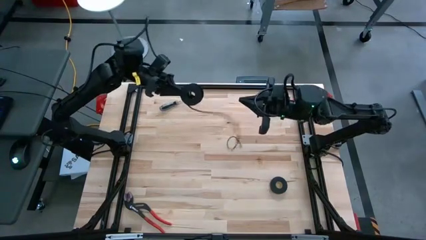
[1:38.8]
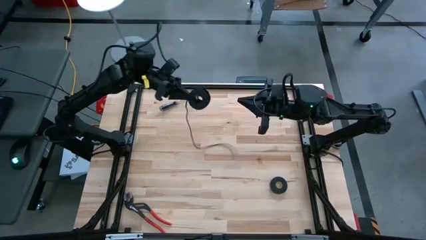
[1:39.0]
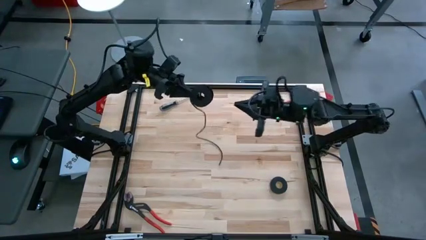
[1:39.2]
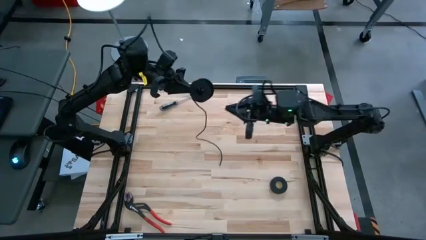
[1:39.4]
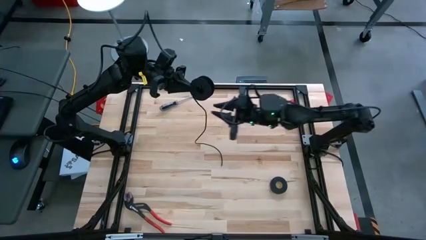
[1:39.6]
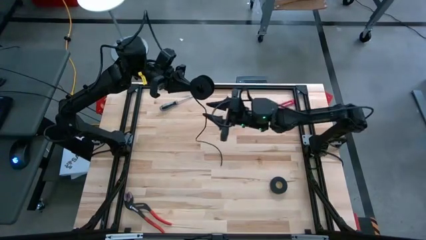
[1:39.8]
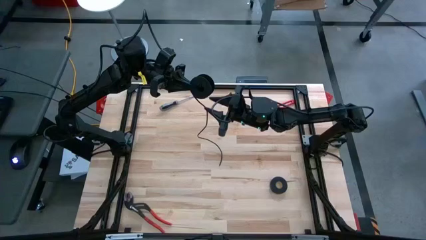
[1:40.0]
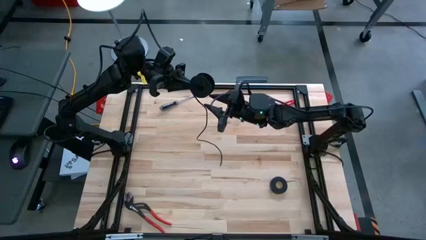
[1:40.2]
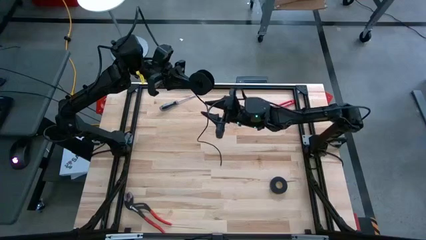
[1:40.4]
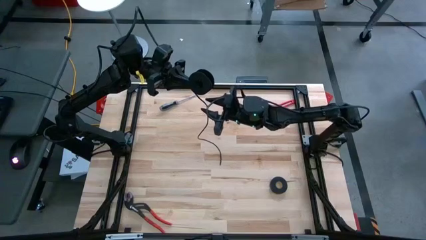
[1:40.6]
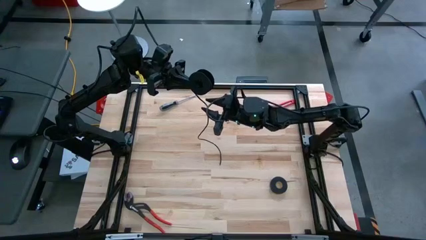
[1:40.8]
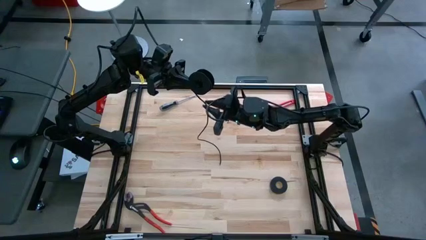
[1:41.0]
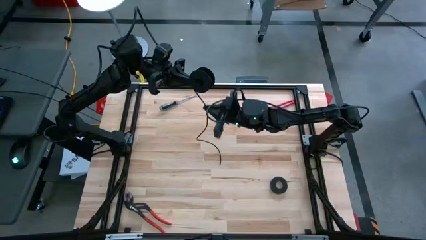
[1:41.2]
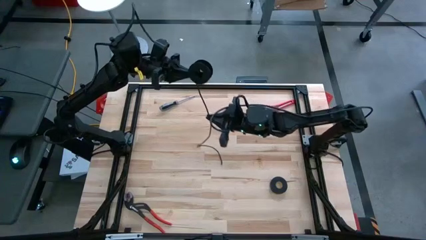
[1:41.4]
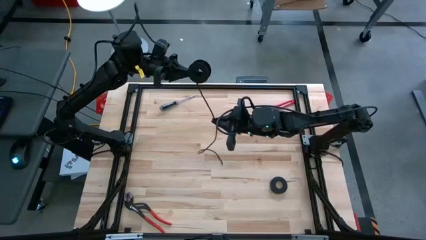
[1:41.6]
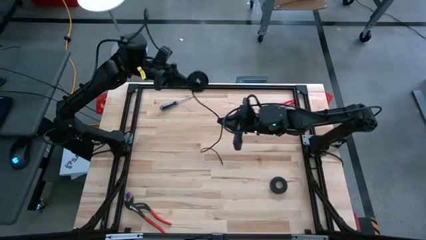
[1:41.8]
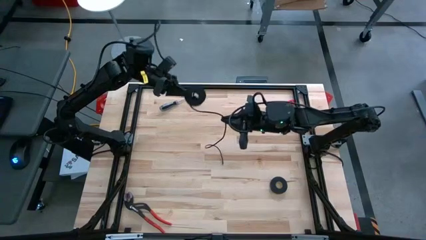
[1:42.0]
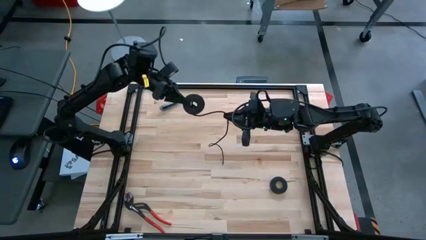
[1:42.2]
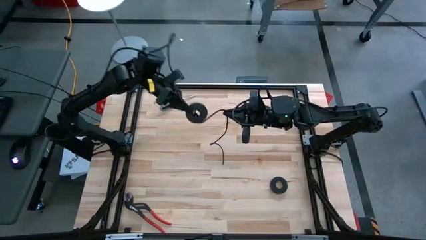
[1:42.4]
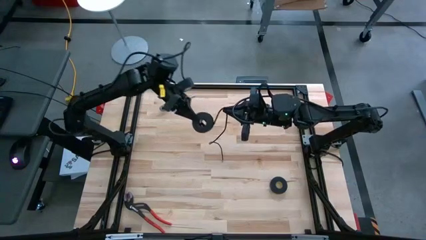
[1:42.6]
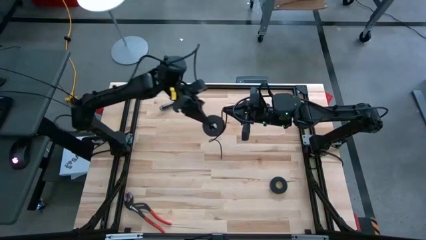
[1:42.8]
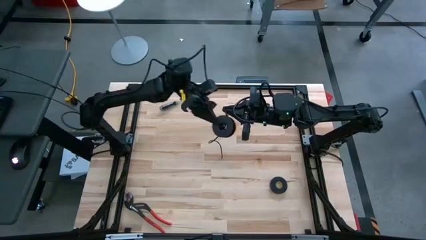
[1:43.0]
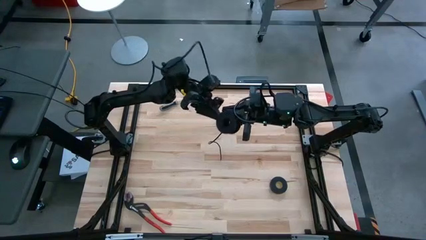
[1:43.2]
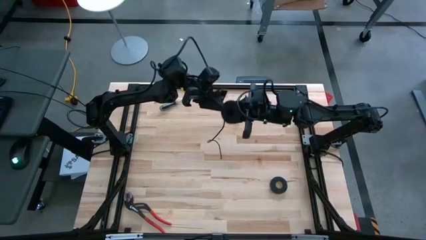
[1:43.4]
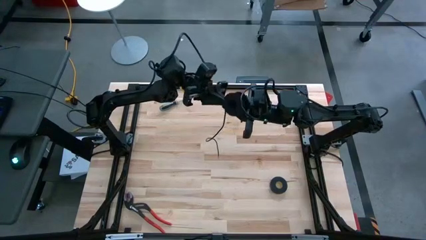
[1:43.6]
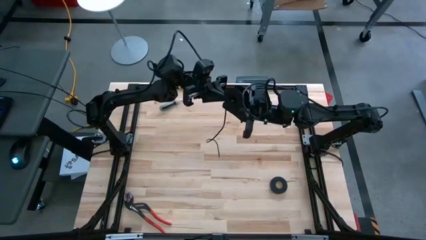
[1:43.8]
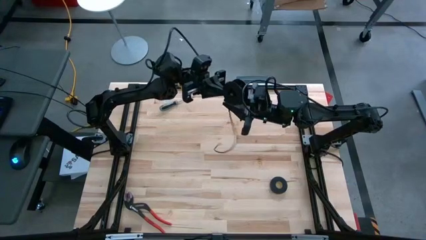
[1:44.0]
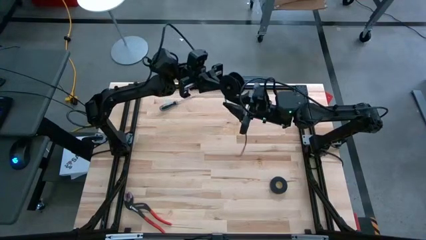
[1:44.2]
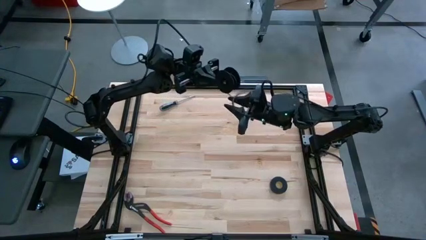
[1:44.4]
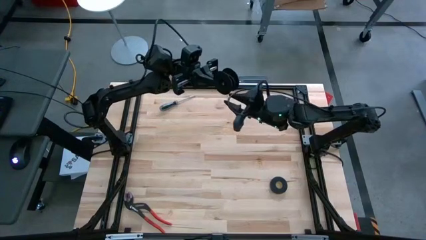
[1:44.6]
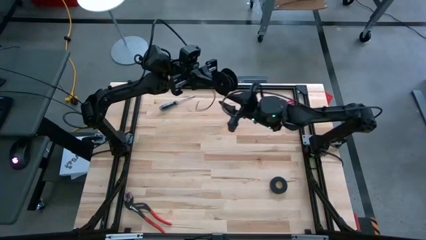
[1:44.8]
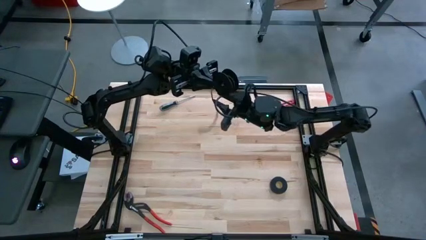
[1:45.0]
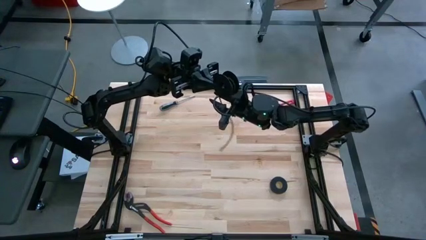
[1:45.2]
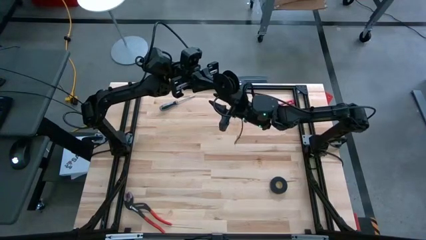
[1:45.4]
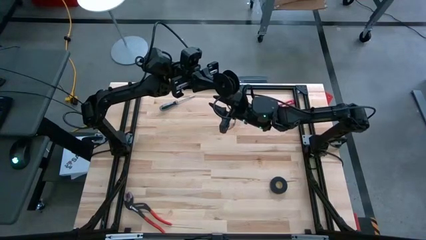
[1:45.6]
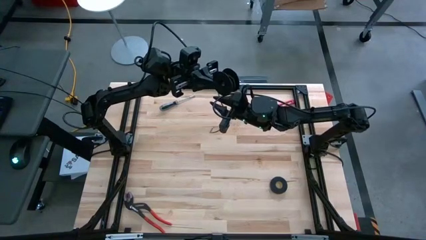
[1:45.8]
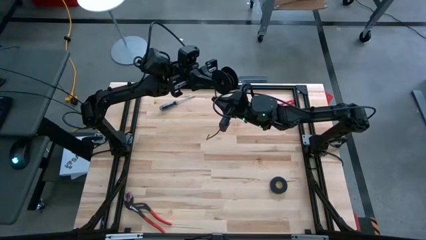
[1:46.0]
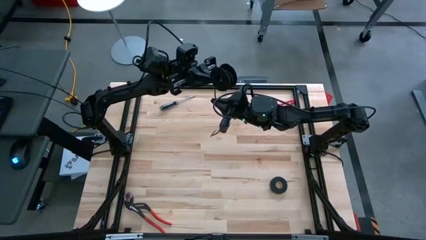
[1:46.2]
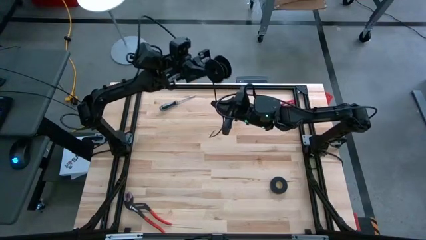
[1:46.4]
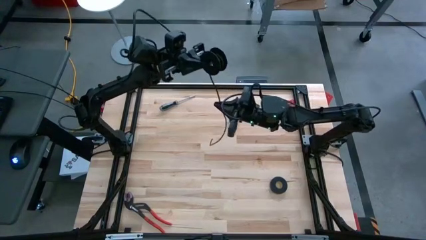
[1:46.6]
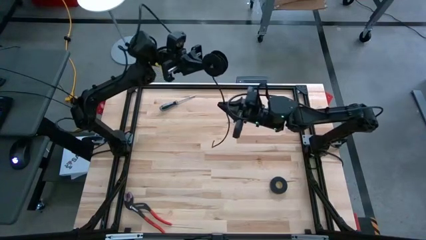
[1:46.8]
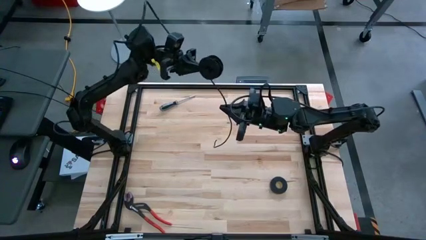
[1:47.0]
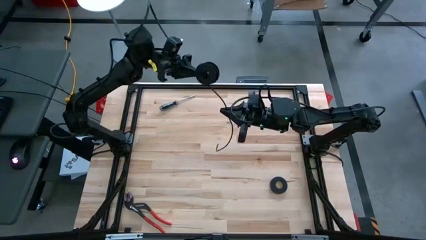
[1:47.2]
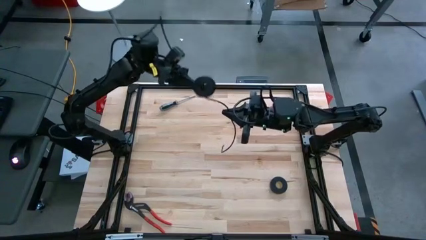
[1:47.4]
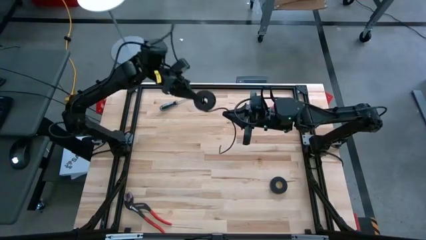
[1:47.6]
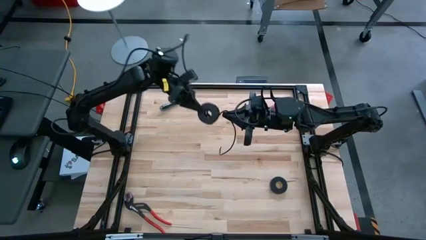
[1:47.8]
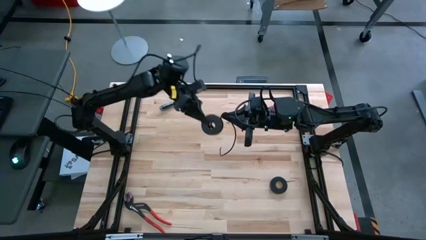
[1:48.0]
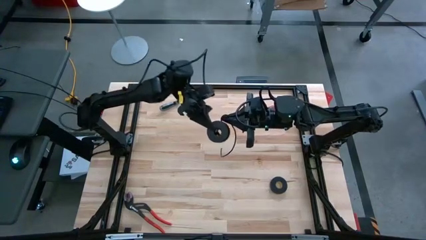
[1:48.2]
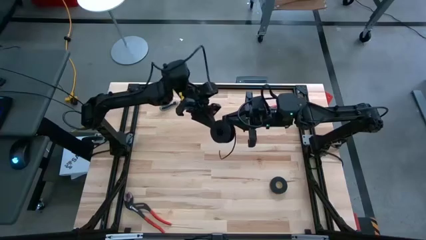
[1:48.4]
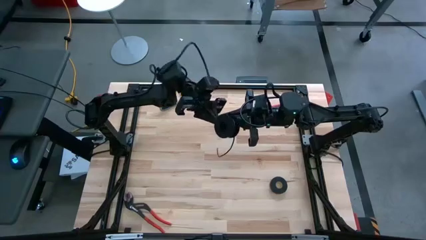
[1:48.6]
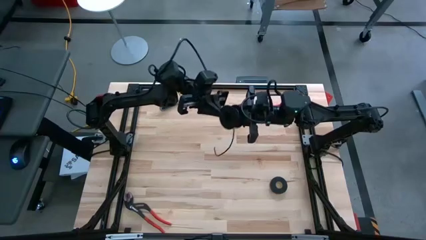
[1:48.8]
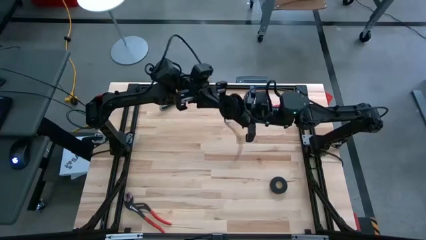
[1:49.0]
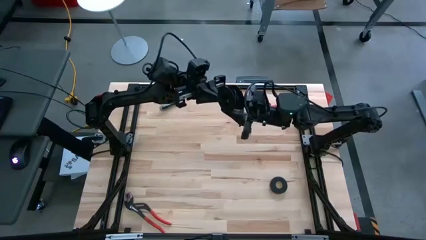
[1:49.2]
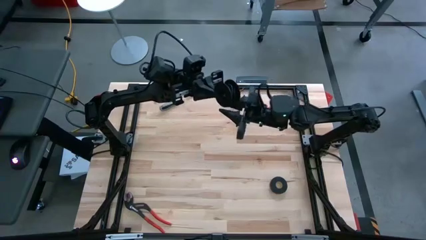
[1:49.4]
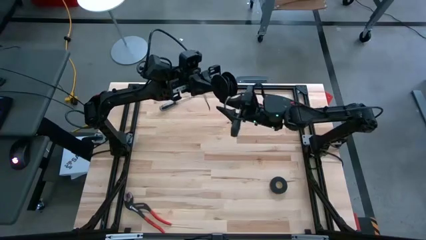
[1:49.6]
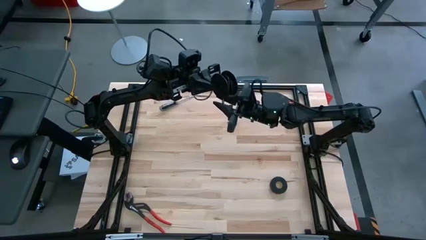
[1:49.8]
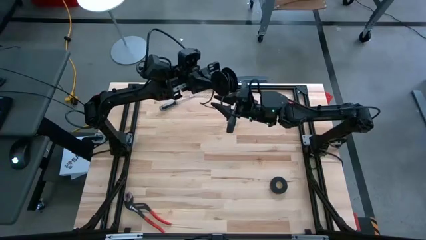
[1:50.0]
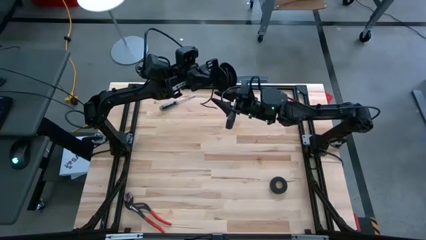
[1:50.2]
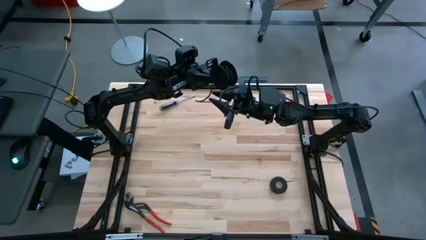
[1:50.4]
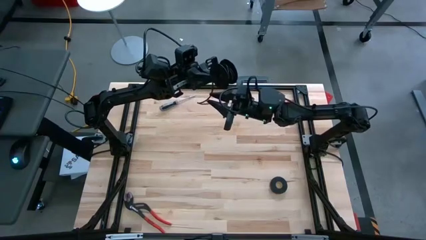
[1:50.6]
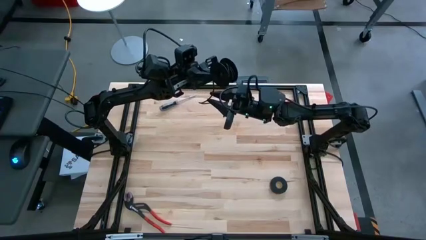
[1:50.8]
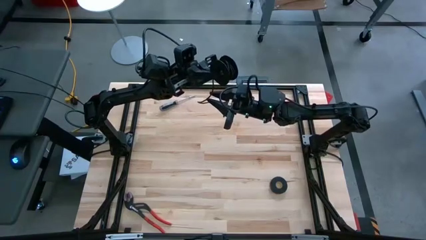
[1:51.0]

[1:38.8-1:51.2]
Task: Coil cords
Coil the black wire on the black spool

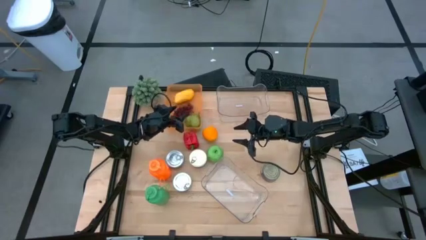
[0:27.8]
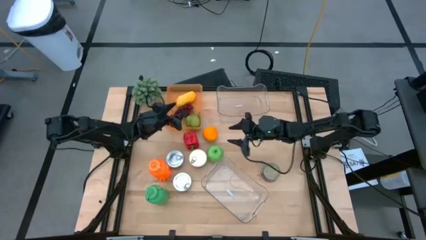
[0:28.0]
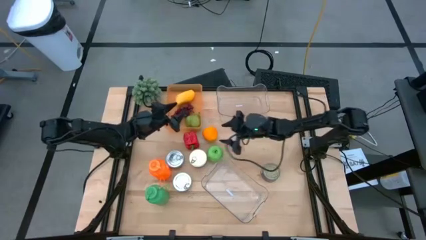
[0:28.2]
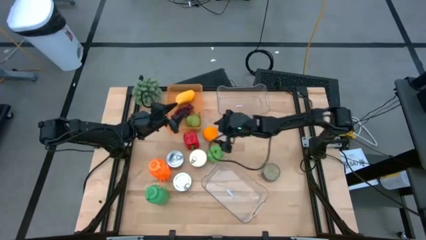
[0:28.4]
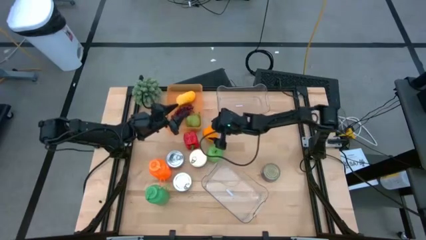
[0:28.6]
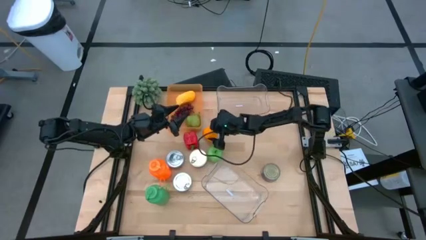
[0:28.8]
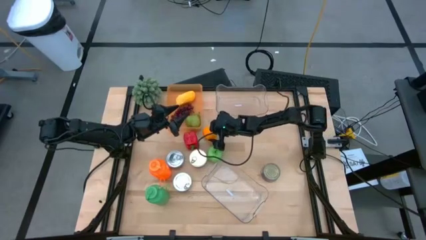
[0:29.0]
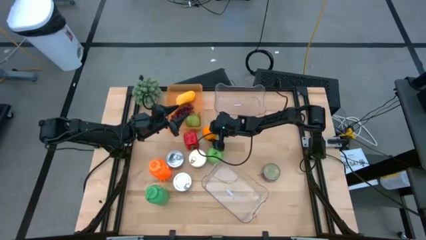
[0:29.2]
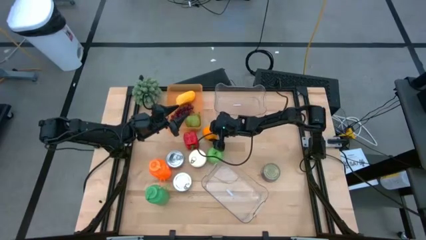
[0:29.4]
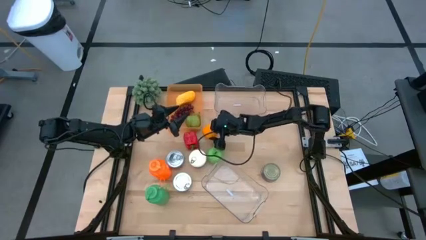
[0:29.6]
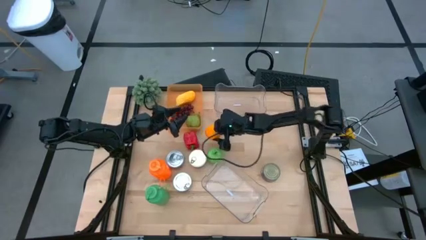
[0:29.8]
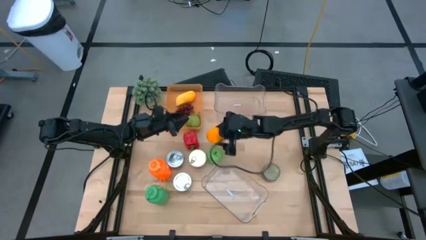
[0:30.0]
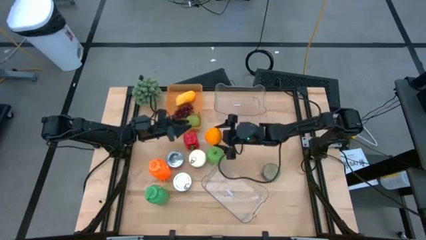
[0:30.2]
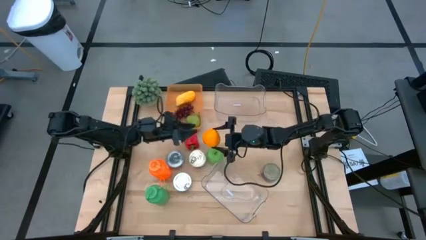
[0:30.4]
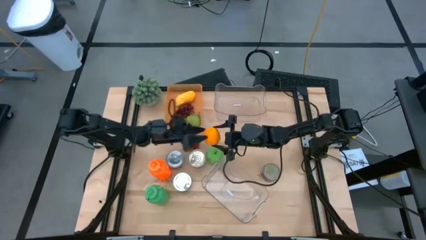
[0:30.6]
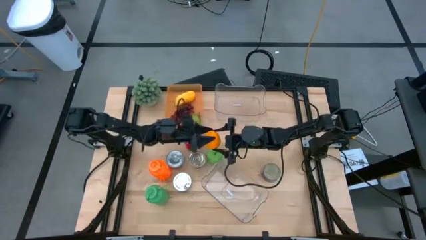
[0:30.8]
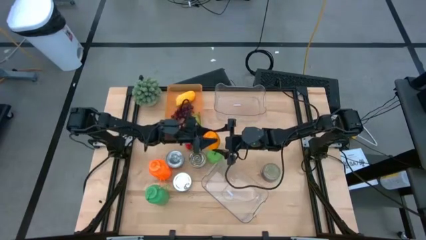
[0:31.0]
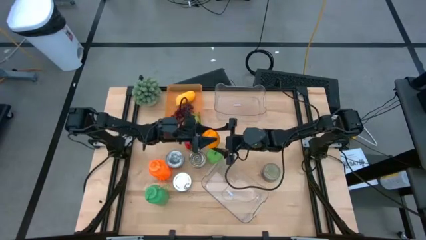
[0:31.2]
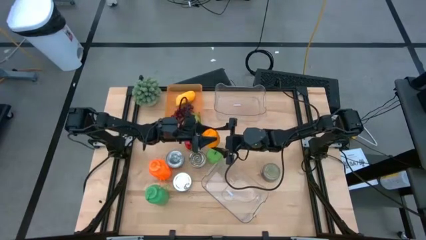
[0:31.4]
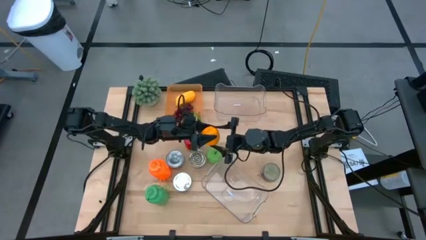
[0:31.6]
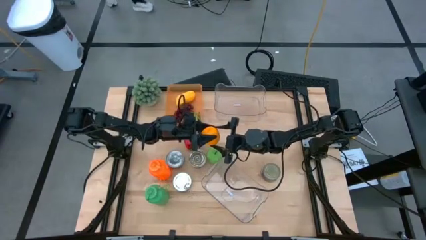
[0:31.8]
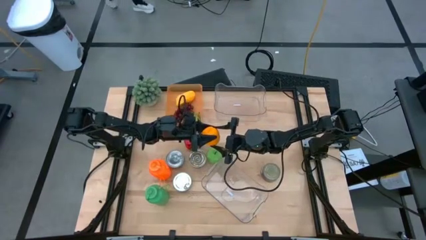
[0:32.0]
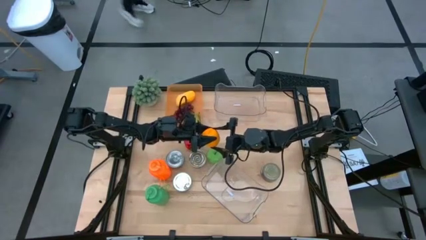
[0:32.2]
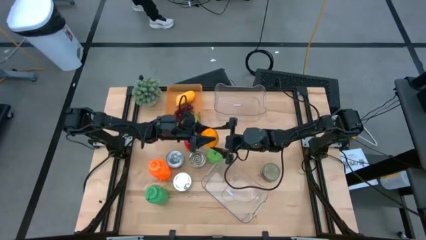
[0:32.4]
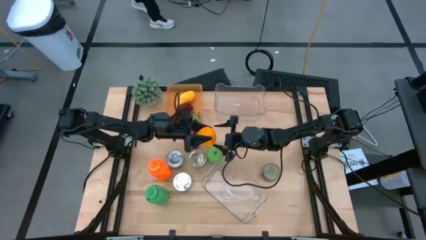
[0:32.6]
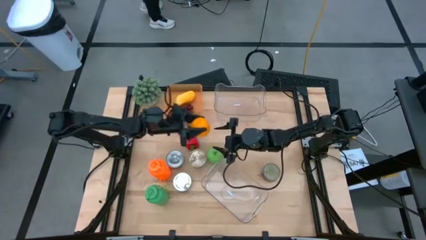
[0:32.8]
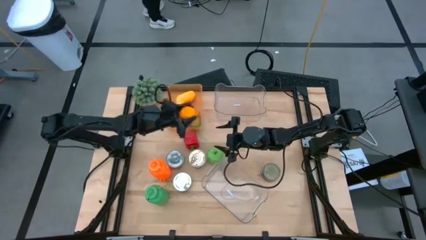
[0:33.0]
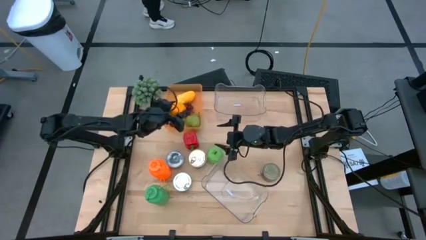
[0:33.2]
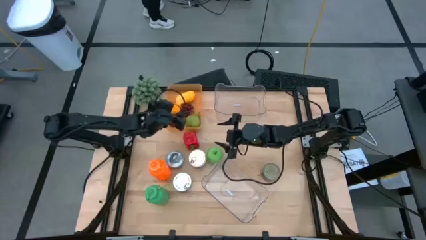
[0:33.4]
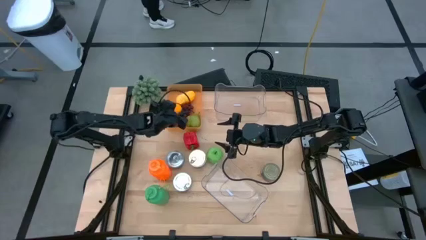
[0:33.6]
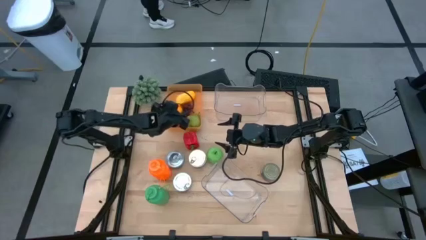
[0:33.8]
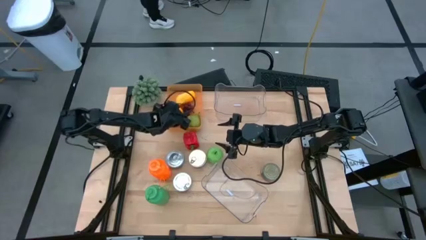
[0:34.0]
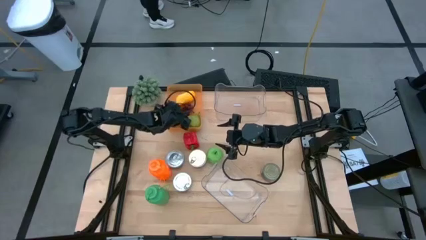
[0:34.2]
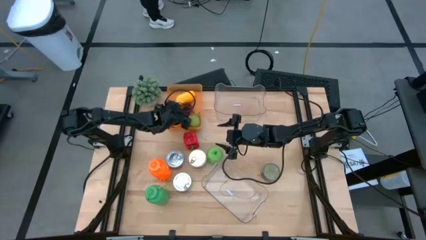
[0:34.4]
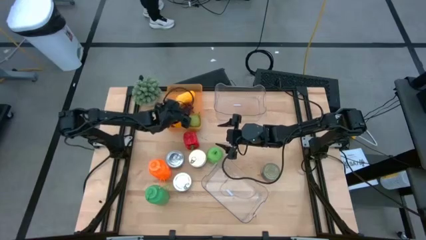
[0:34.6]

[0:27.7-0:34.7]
Task: Pick & Place Food Item
Put the orange into the orange bin
